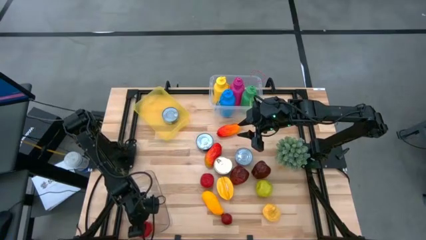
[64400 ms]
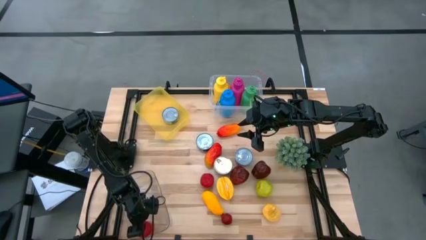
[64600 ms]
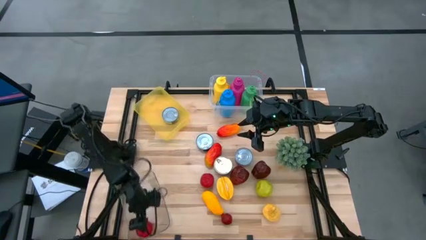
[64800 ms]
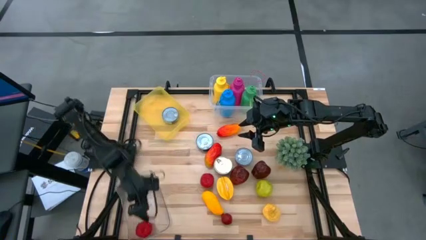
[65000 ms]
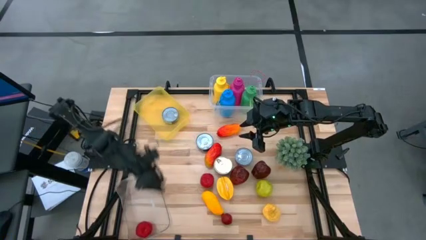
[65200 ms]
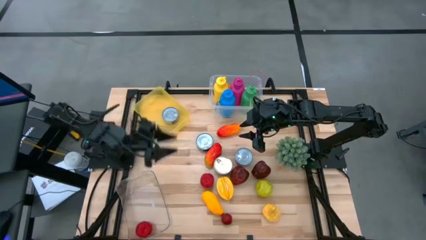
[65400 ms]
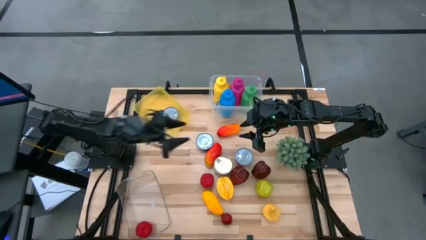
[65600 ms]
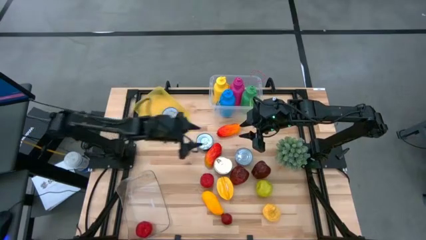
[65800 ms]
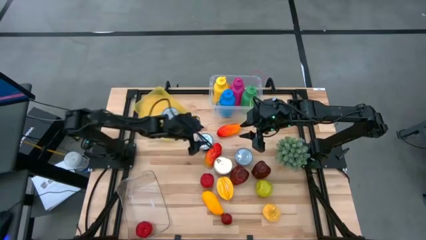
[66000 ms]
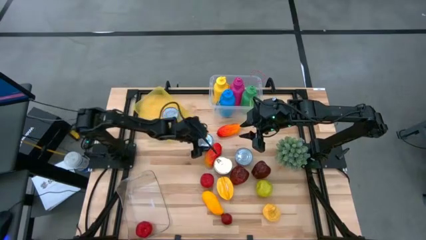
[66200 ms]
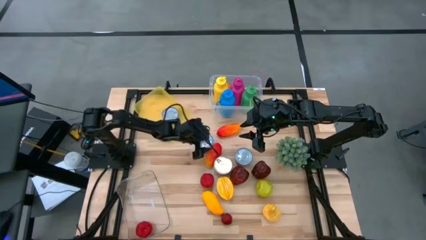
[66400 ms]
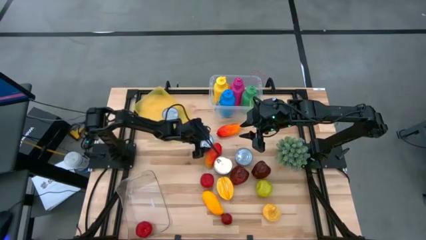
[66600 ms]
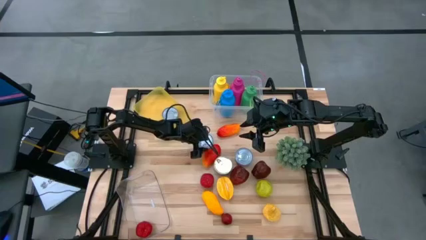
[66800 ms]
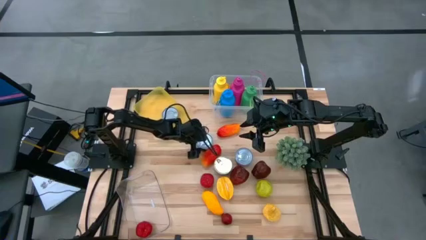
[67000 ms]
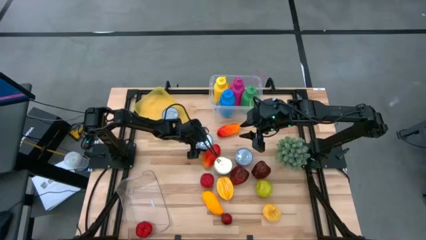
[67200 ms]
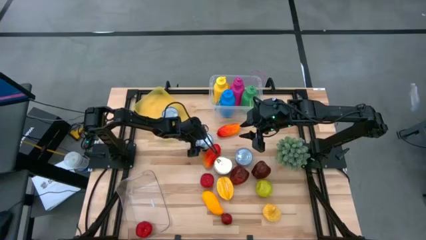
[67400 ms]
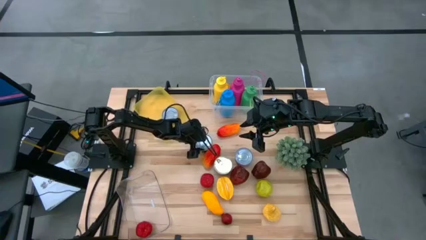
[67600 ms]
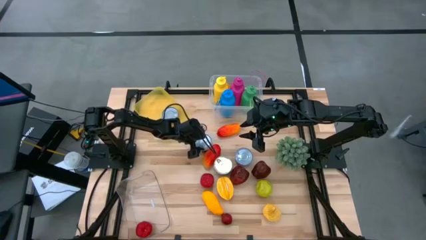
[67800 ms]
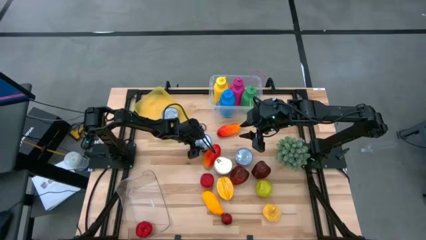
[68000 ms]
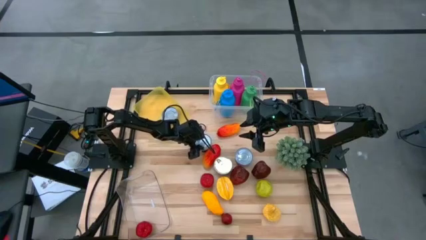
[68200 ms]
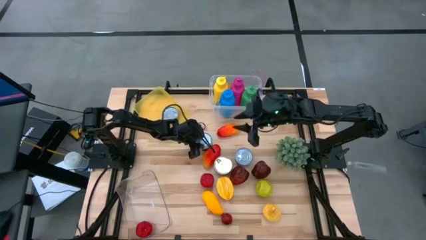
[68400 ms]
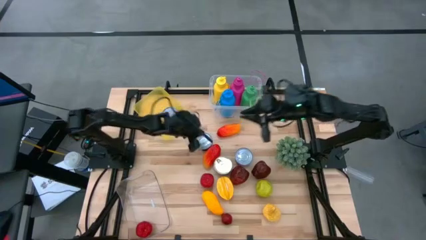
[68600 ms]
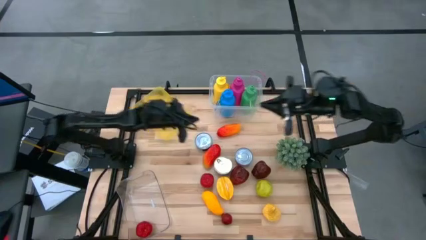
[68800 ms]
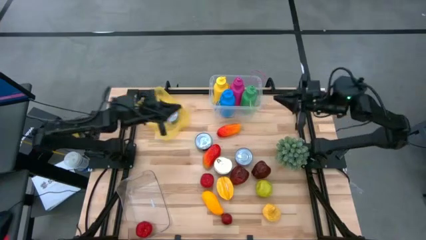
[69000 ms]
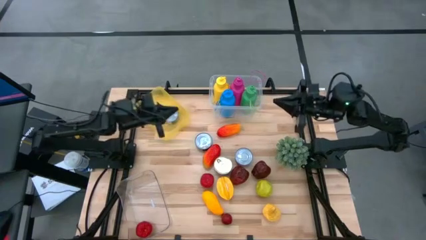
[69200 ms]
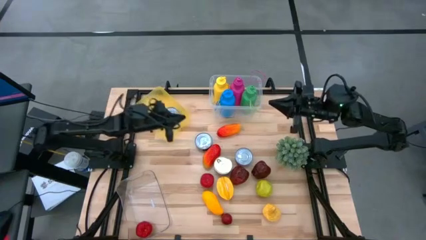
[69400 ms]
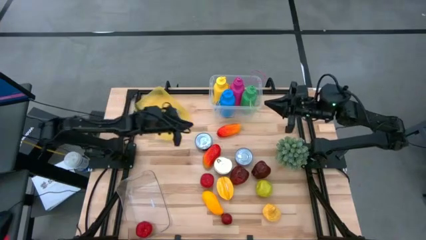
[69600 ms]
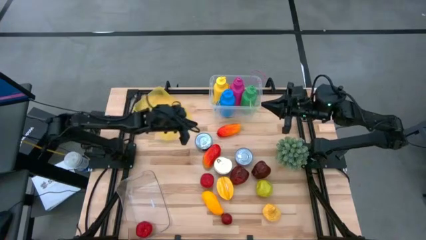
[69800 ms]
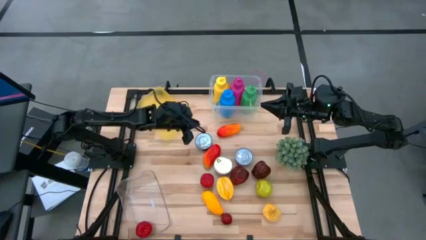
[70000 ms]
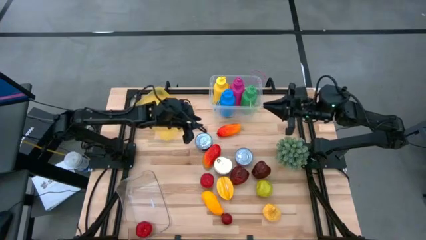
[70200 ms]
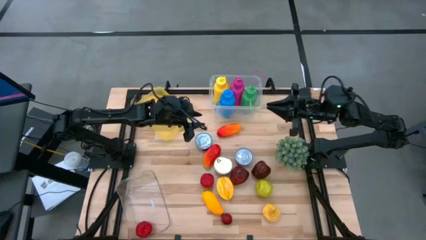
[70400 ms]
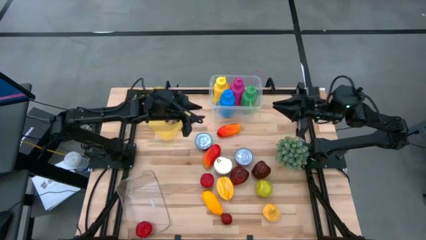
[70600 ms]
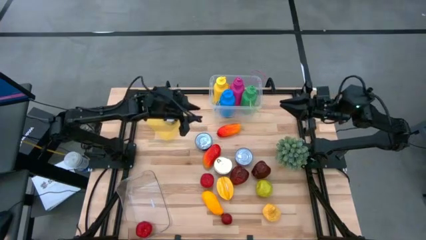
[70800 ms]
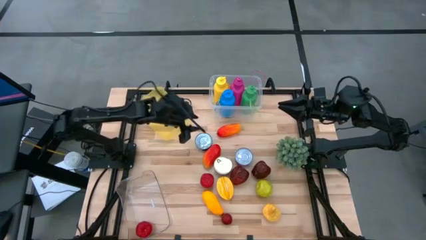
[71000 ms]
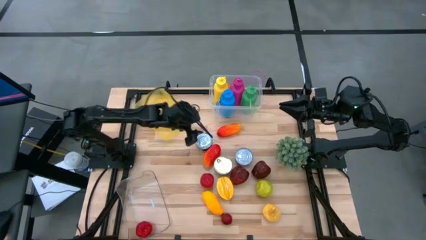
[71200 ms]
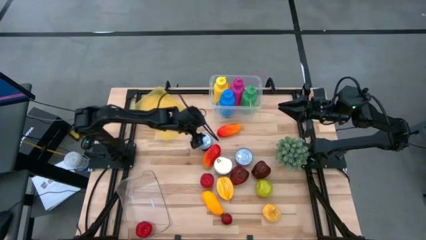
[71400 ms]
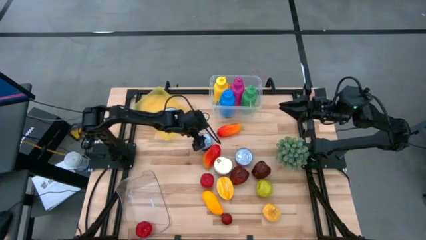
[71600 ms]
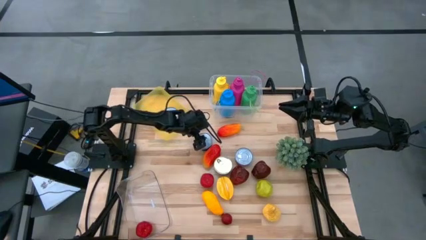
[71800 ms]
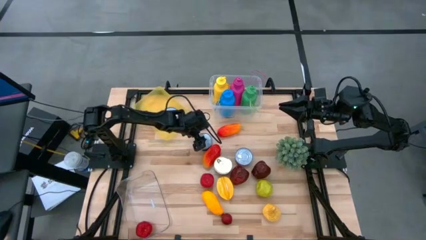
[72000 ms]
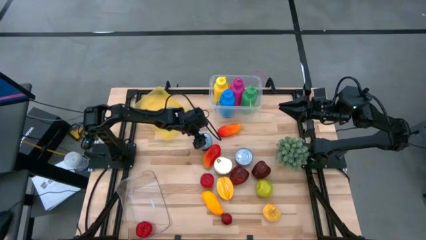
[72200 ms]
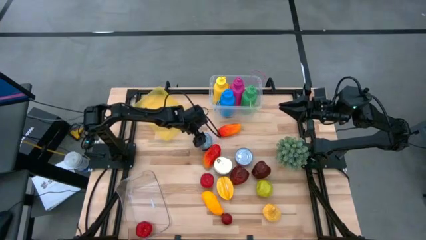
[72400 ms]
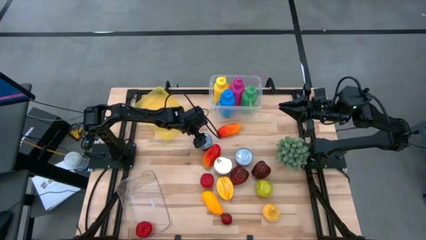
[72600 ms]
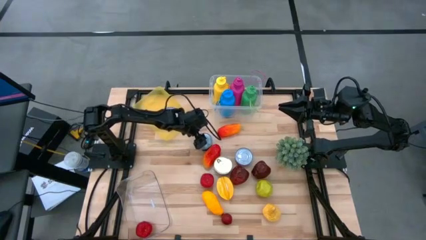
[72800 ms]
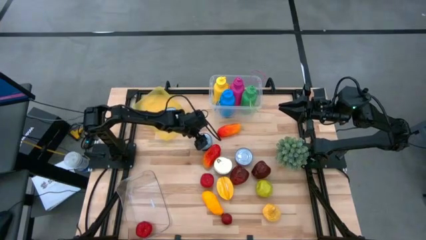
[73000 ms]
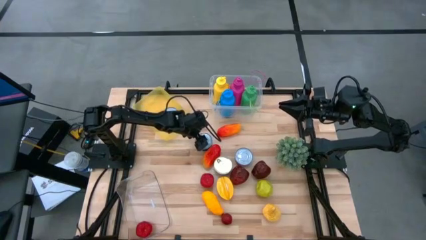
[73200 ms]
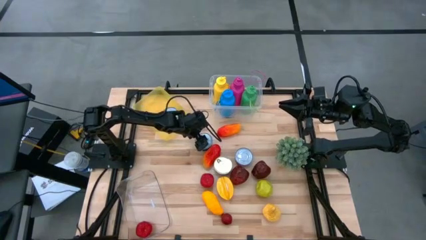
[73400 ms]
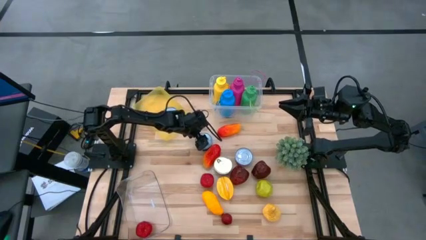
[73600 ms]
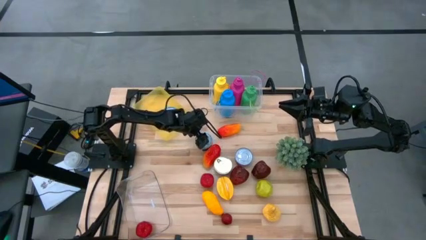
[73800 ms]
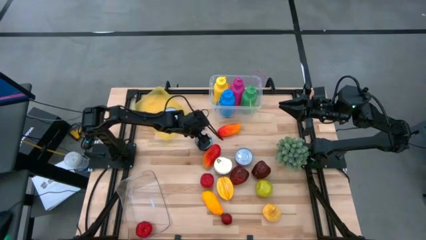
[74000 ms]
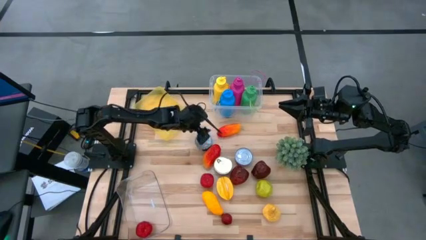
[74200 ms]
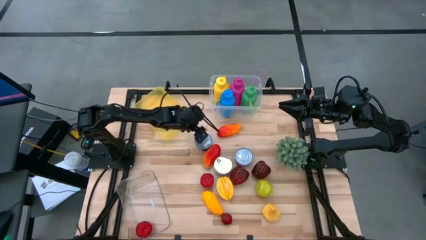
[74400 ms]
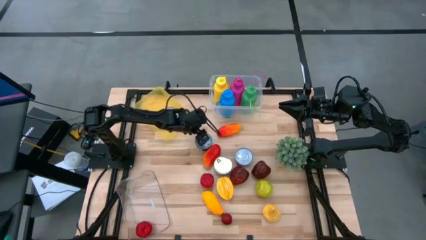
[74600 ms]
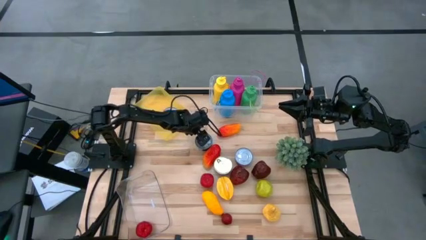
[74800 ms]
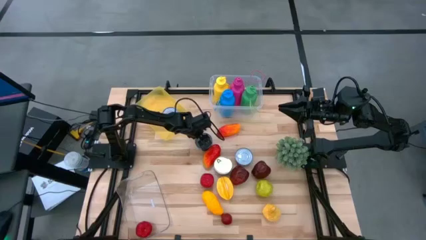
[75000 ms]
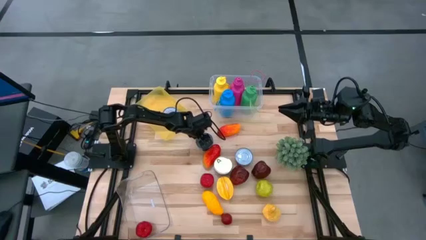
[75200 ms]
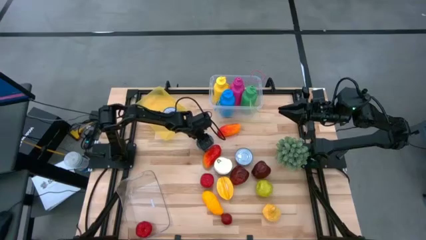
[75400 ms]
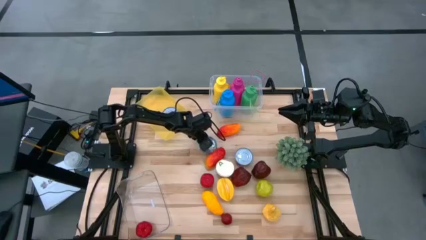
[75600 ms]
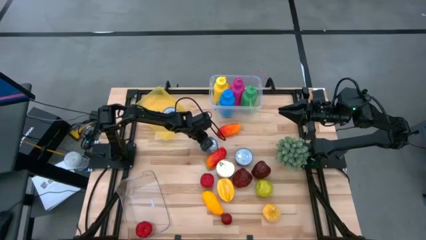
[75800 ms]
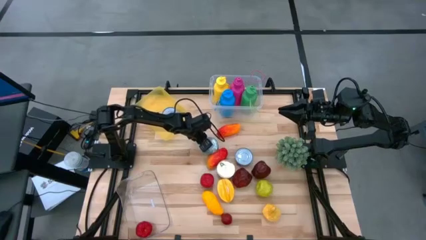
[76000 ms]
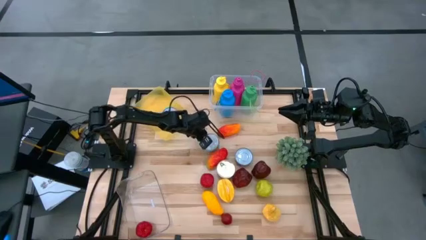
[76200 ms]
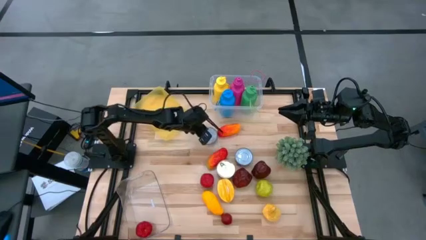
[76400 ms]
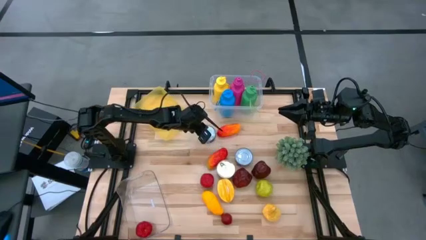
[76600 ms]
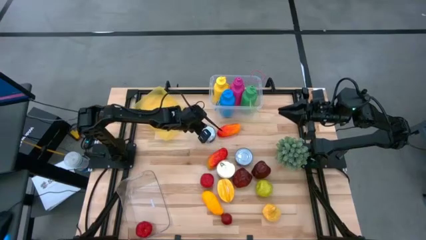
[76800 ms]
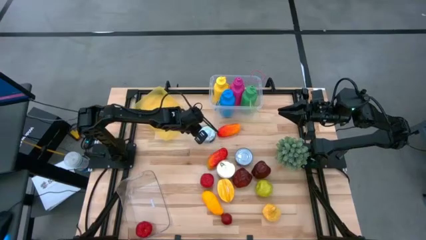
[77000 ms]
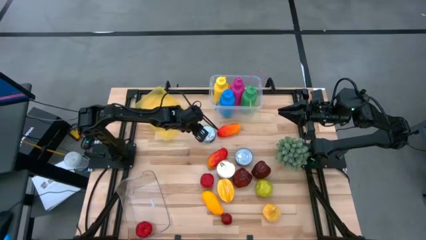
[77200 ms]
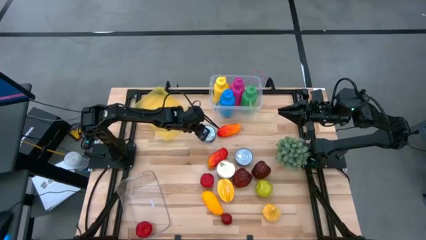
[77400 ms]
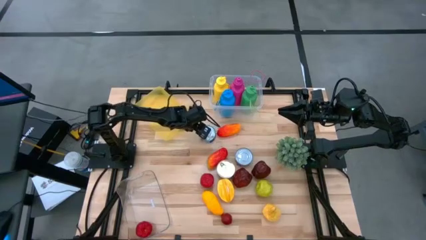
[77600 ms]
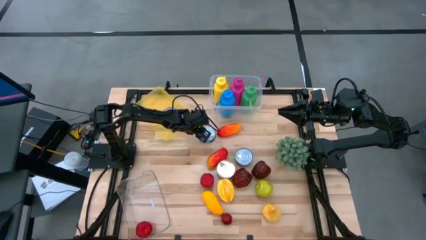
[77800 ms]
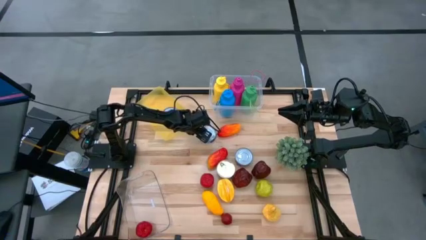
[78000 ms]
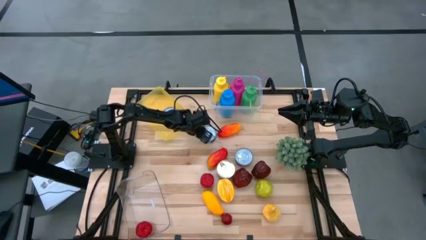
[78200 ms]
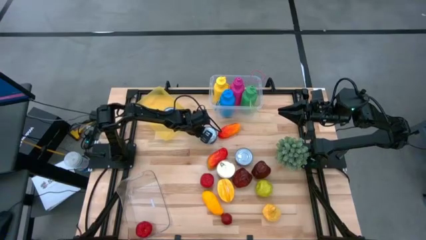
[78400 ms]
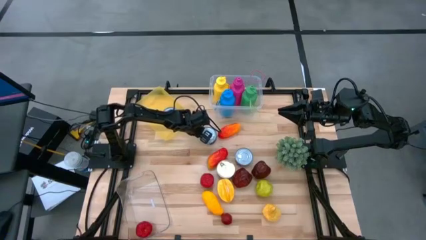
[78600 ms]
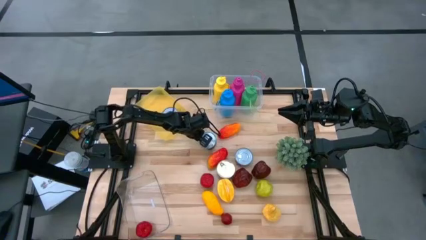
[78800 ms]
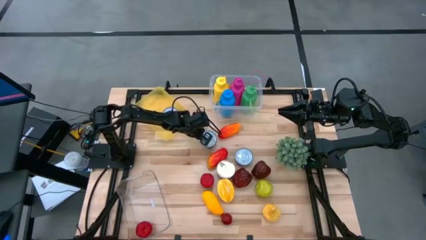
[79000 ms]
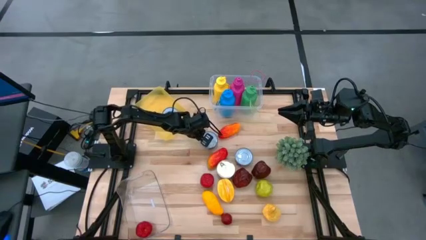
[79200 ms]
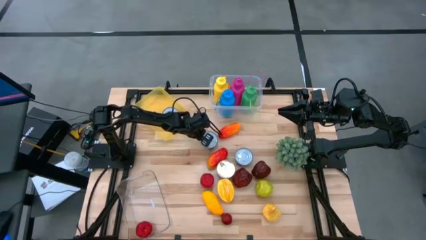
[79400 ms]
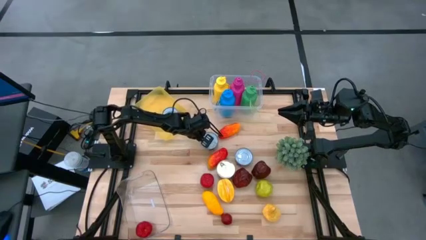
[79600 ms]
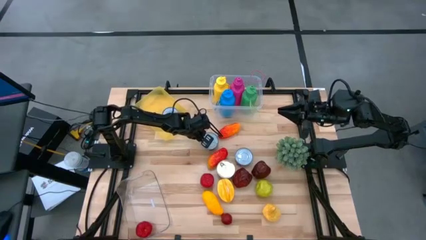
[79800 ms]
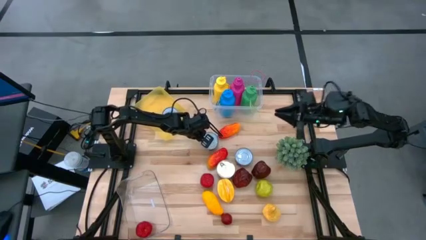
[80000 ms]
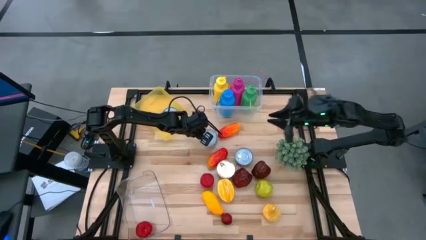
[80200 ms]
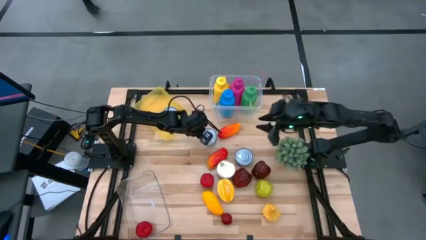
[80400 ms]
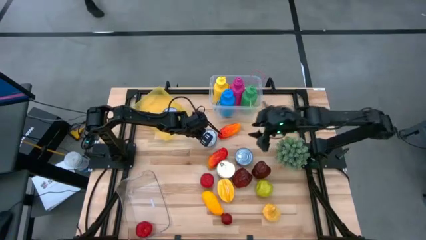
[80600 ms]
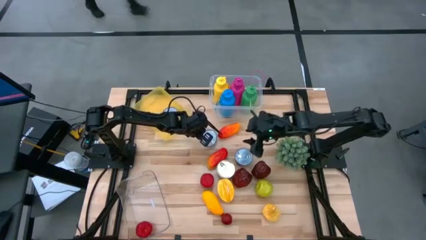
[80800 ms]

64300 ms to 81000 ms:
Task: Pick & Place Food Item
Put the blue tuna can into the yellow bin
